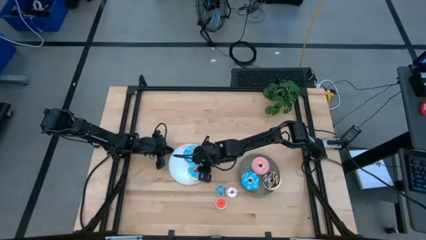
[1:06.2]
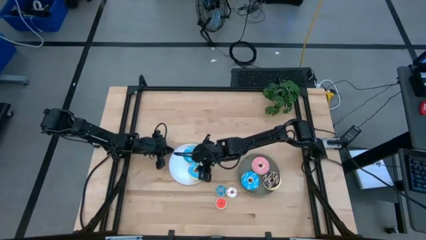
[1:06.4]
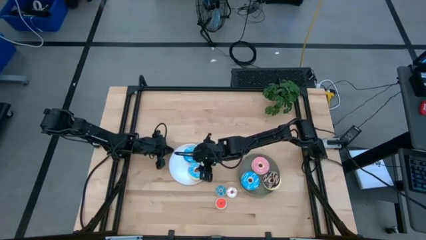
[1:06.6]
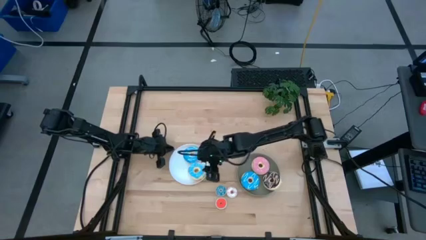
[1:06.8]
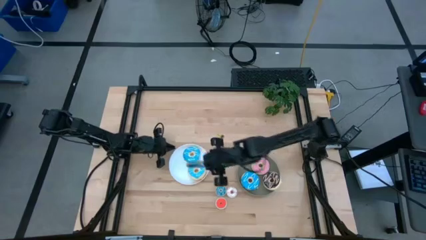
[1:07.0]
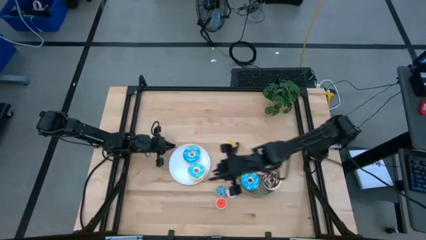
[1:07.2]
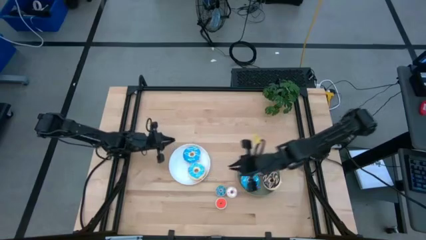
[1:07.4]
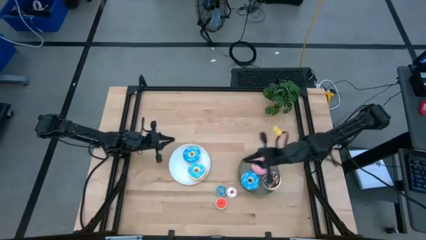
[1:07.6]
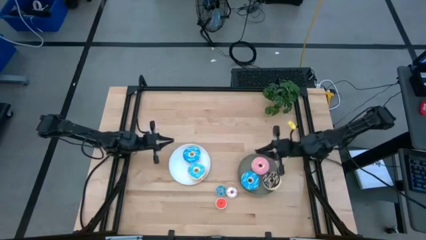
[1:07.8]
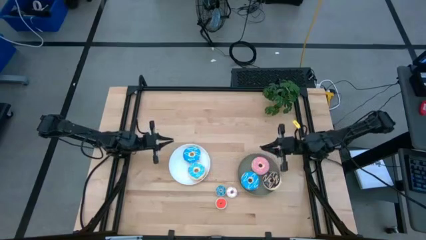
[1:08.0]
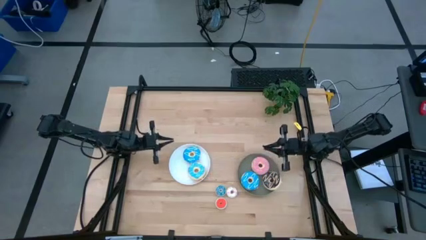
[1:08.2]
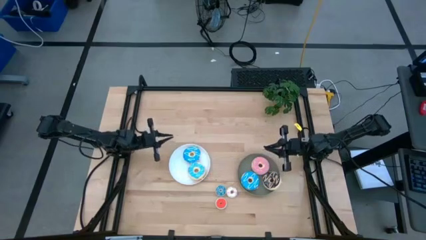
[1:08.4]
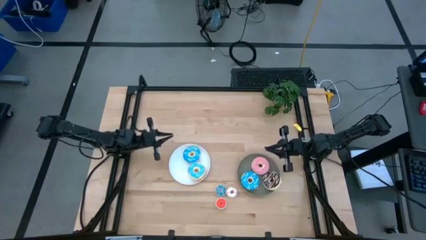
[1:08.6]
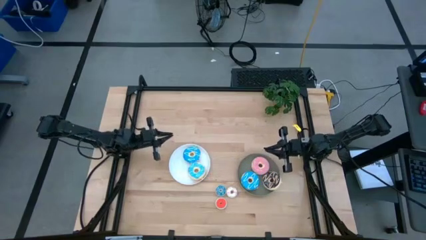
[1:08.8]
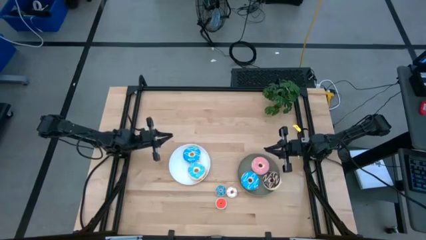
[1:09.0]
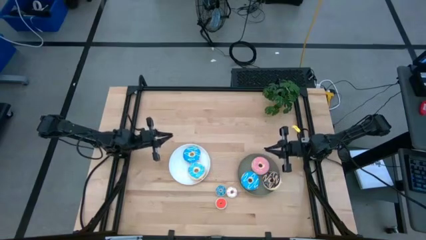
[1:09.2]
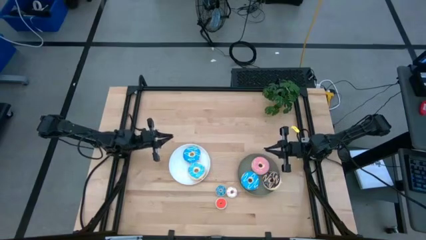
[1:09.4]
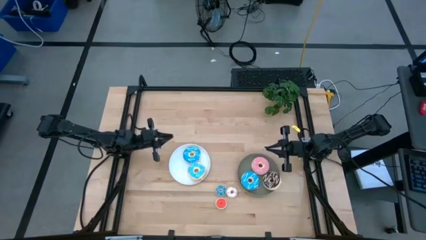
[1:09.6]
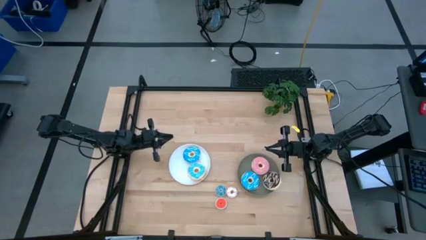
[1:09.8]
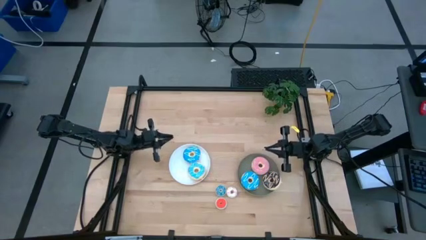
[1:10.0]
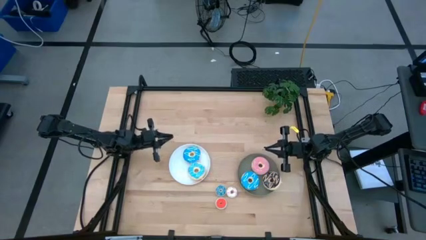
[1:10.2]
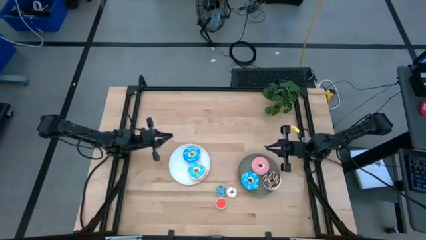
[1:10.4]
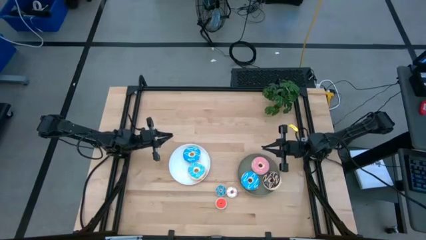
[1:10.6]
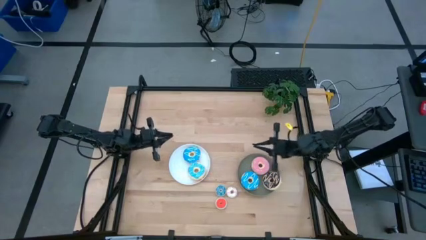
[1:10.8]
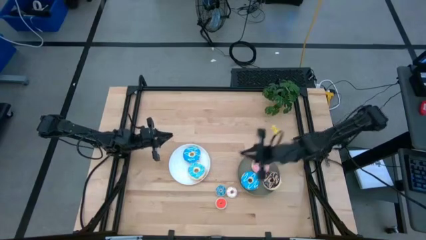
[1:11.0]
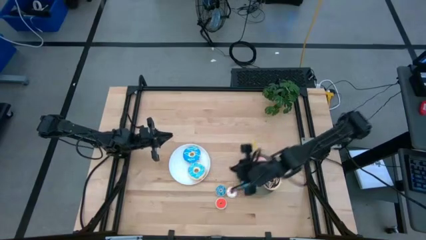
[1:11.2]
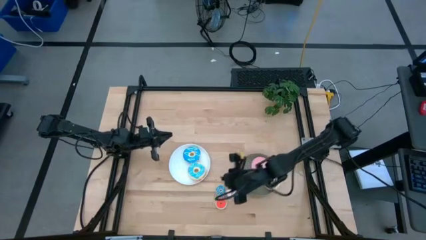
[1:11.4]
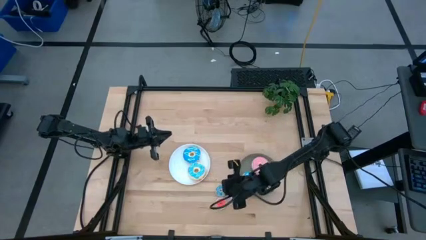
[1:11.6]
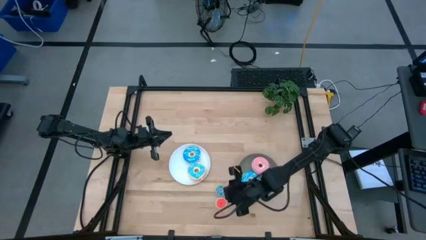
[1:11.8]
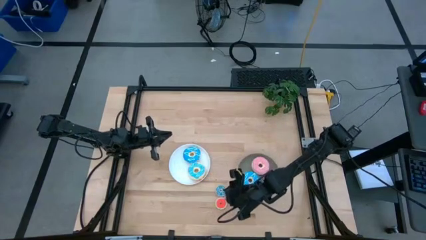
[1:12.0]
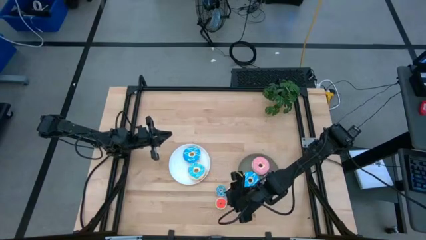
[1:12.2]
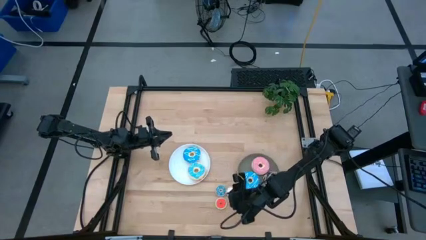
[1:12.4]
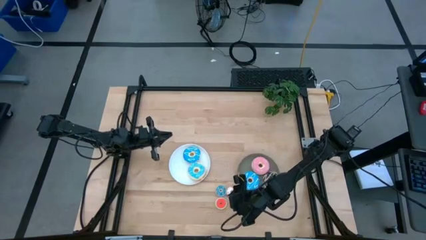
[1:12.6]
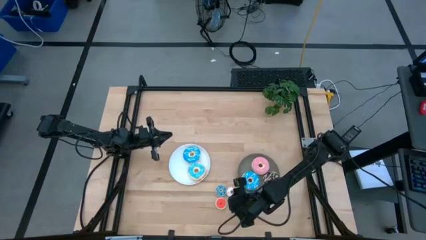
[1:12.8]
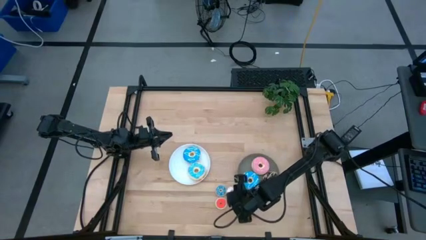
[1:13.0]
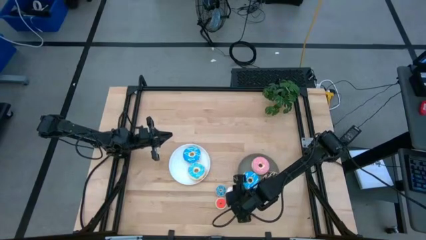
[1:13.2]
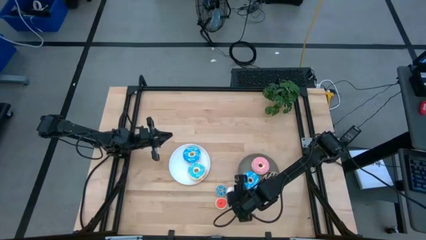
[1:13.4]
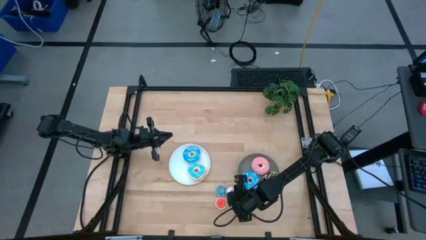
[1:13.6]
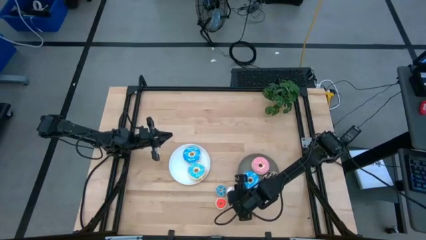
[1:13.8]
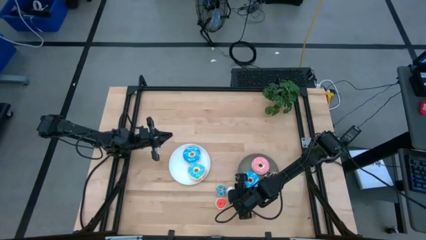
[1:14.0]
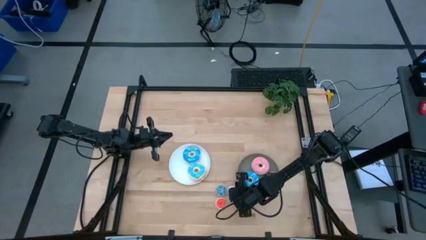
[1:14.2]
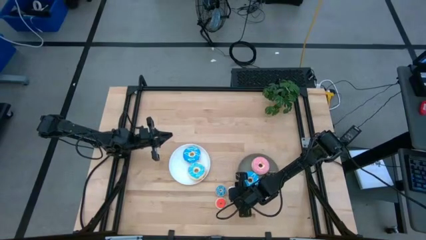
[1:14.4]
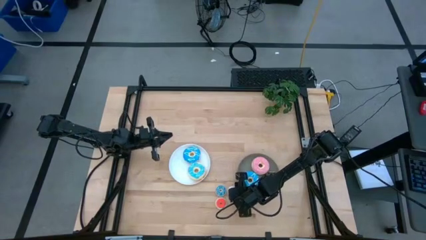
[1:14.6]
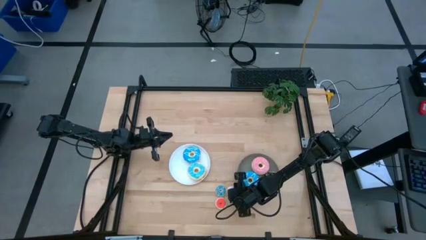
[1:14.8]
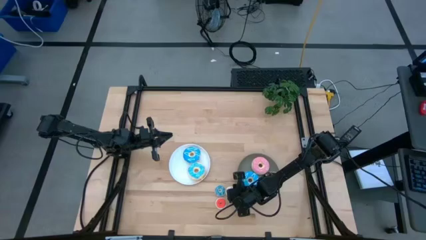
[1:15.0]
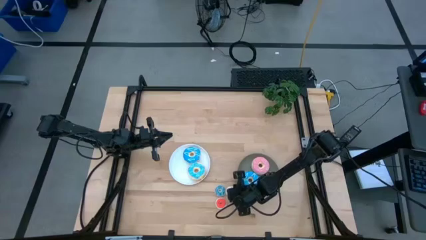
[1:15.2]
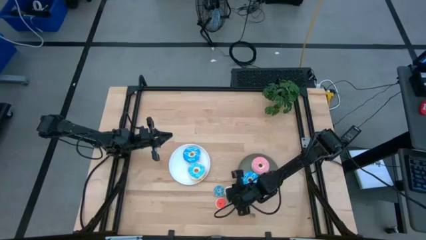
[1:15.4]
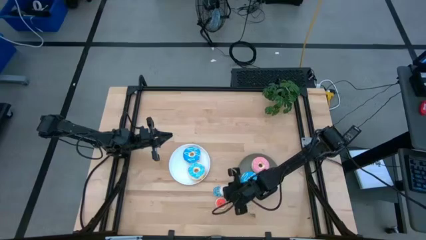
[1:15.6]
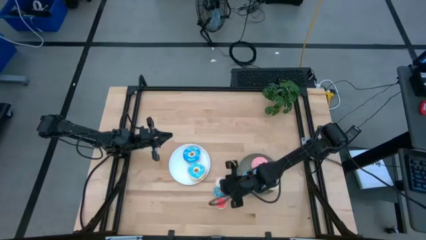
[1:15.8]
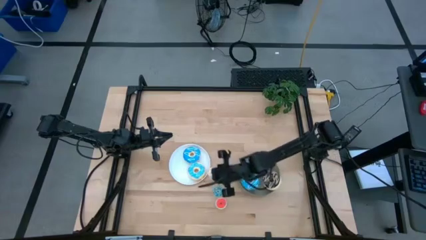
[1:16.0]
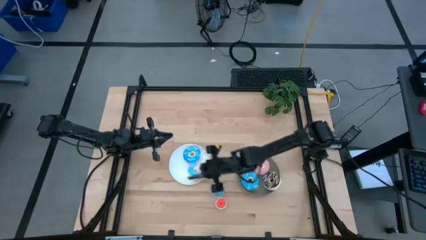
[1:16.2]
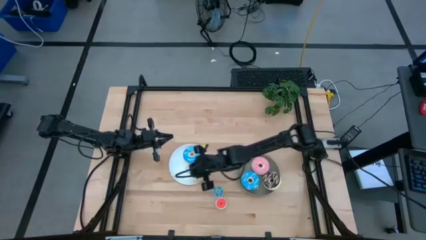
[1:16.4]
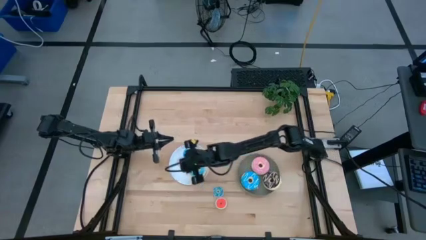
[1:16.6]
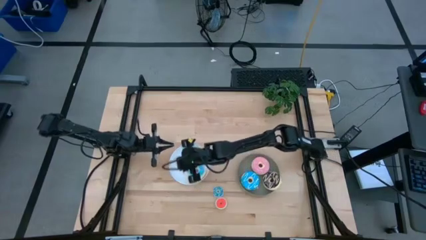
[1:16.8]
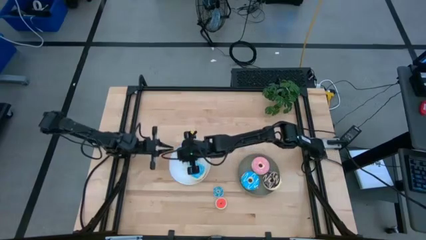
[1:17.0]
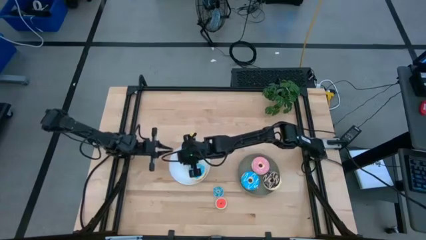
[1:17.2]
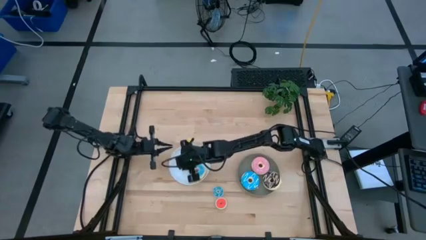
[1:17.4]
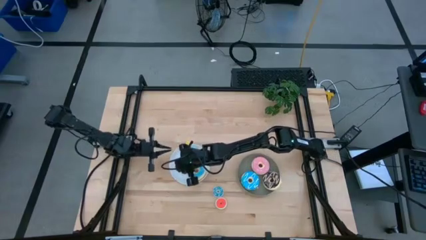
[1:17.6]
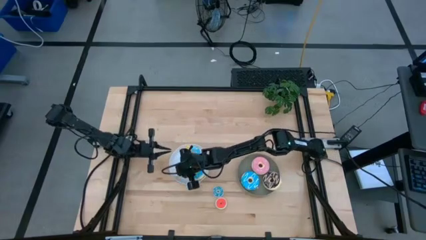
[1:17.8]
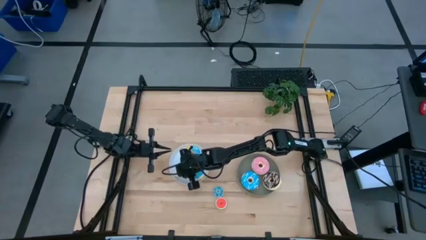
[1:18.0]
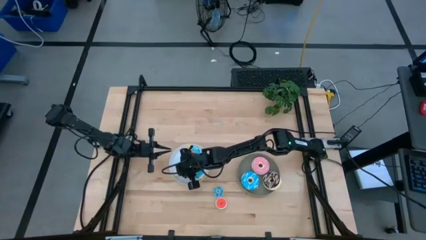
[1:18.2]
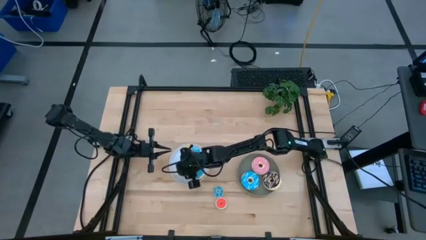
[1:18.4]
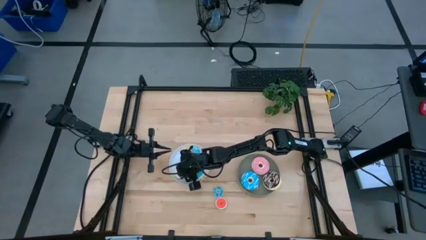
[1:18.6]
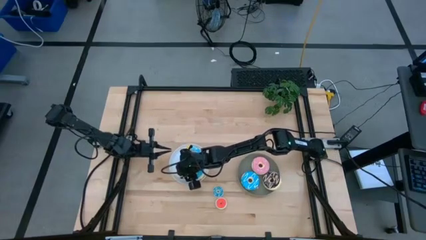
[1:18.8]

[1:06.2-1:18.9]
Task: Pick & Place donuts
Put the small white donut on the white plate

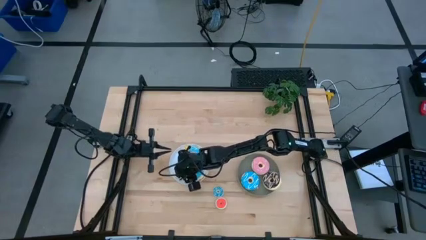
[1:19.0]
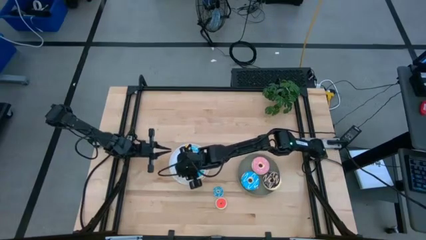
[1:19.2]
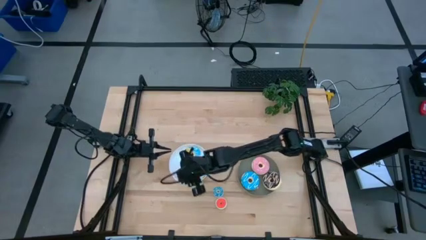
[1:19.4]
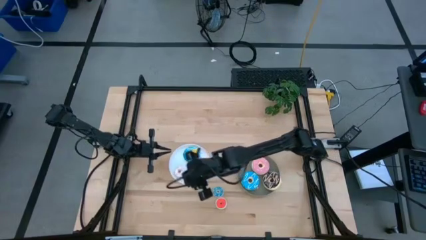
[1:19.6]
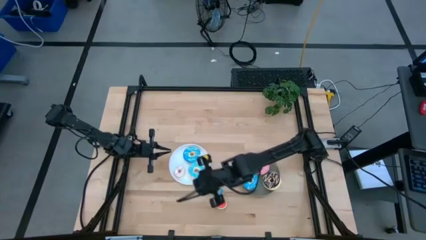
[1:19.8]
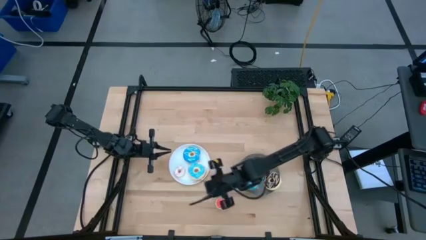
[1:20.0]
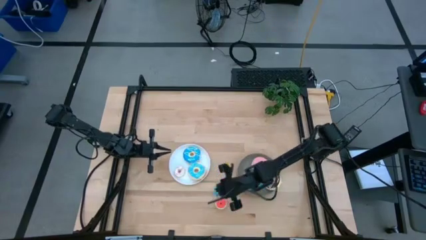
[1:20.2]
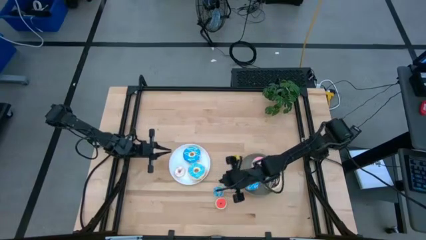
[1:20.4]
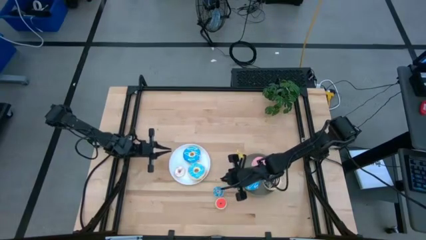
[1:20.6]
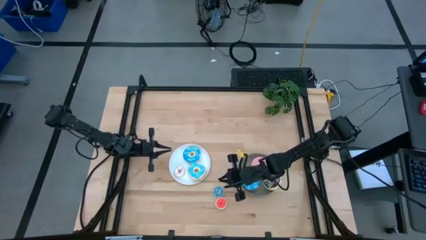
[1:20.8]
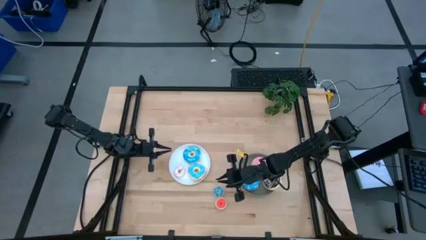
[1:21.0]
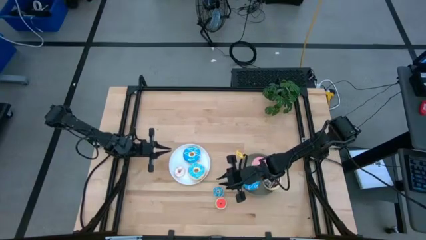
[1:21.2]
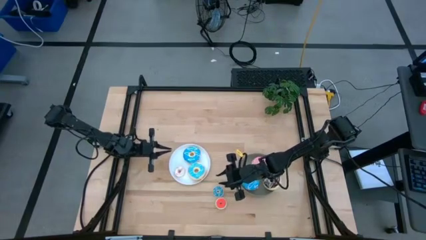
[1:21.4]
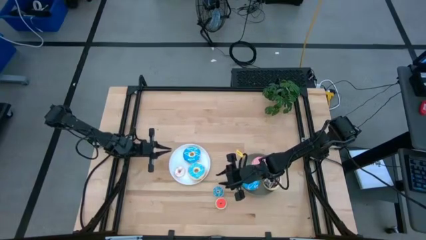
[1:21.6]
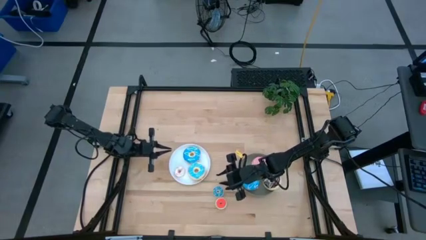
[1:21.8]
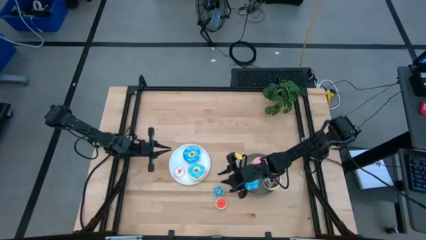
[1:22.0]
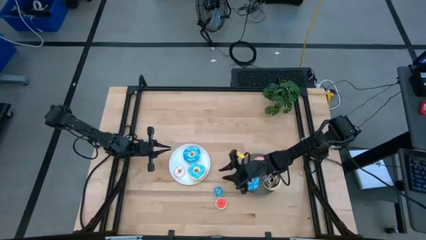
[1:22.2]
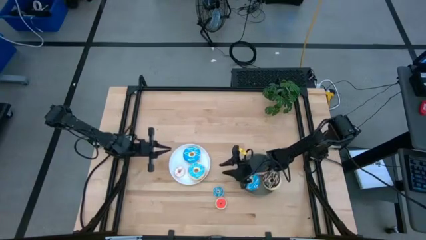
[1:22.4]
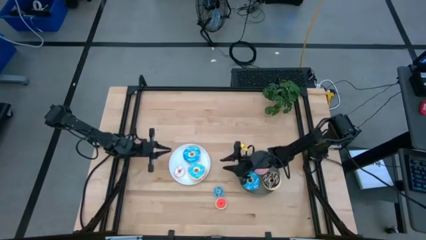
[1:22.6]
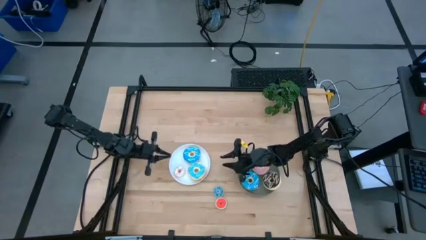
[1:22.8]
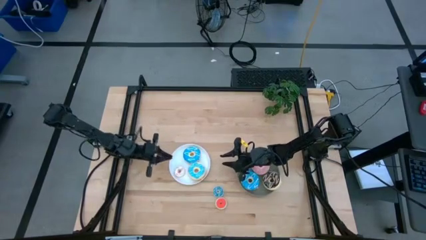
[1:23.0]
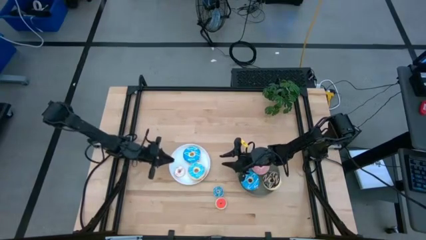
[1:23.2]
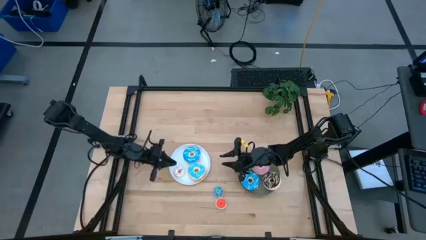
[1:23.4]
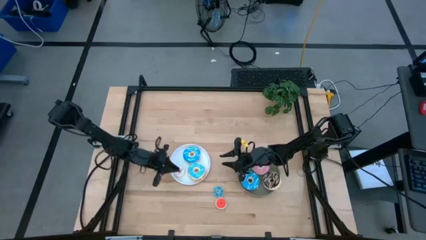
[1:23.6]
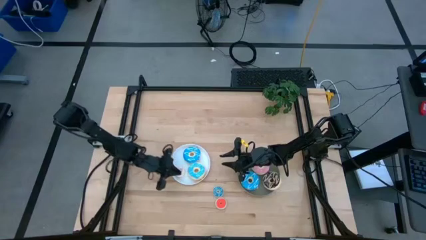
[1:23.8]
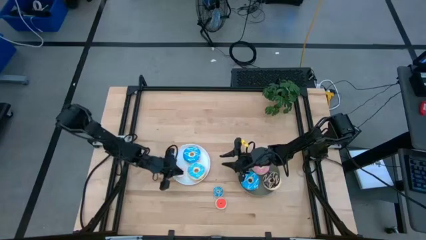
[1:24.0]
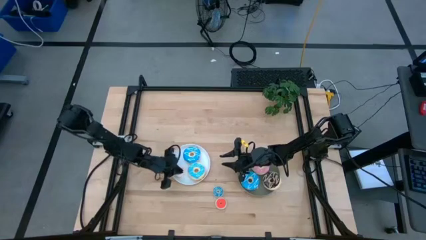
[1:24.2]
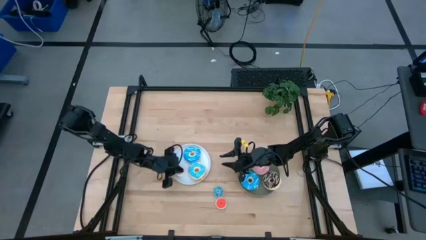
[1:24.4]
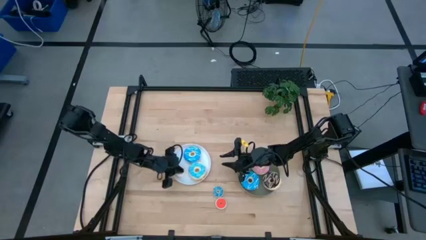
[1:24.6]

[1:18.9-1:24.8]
Adjust the small white donut on the white plate
